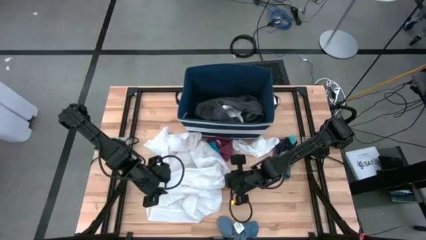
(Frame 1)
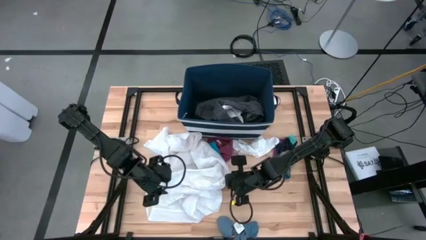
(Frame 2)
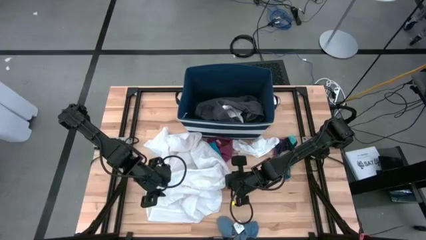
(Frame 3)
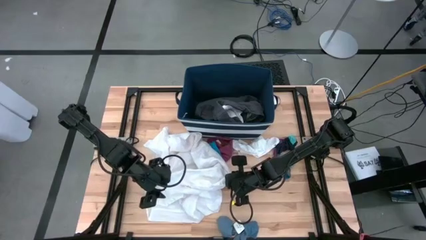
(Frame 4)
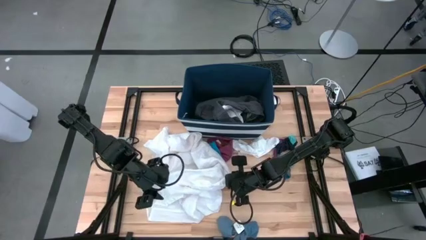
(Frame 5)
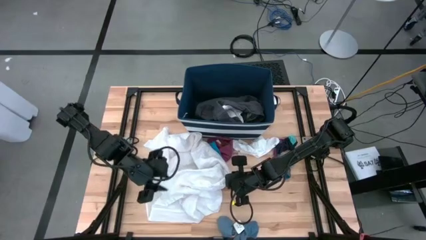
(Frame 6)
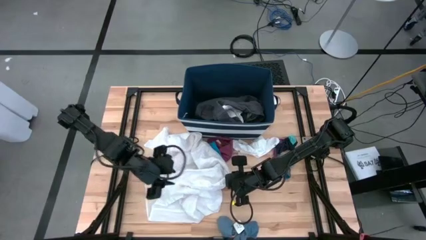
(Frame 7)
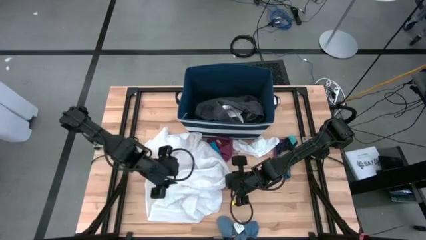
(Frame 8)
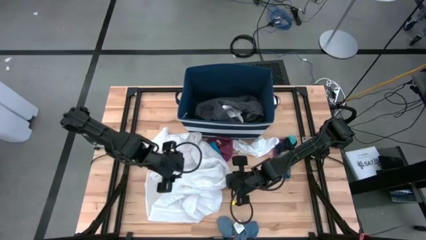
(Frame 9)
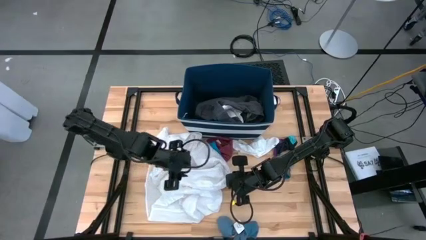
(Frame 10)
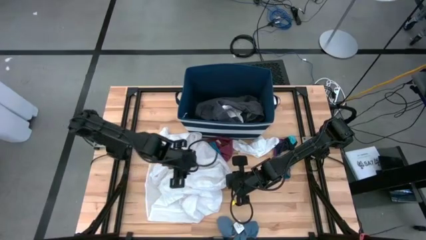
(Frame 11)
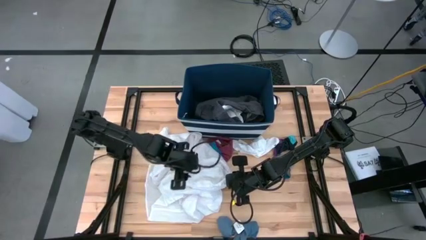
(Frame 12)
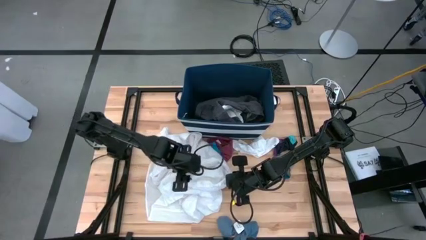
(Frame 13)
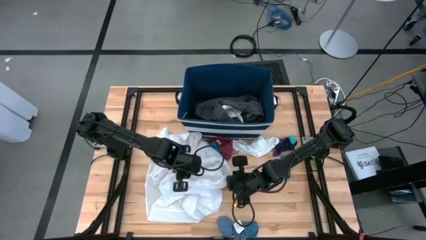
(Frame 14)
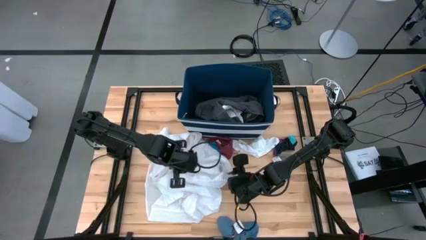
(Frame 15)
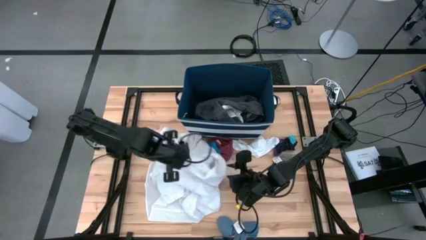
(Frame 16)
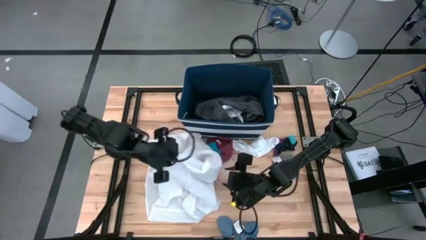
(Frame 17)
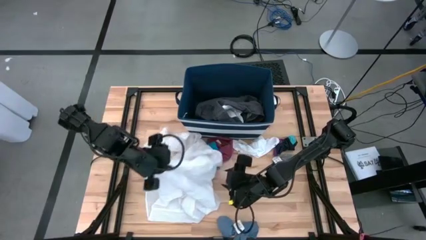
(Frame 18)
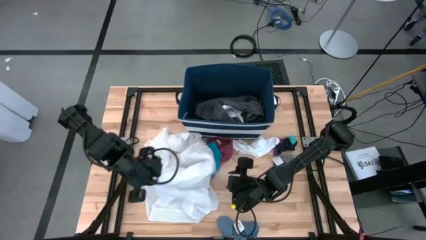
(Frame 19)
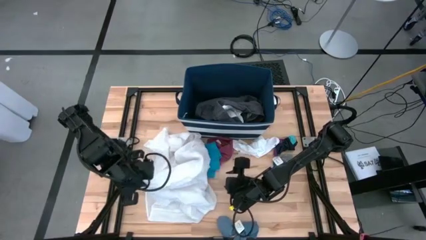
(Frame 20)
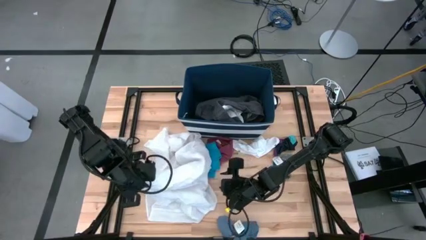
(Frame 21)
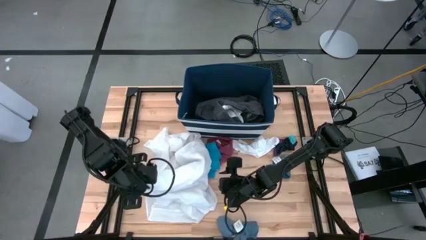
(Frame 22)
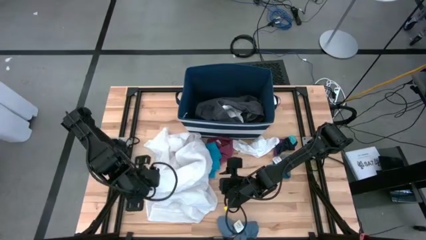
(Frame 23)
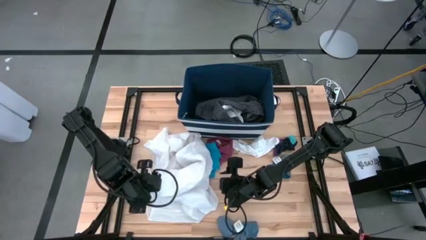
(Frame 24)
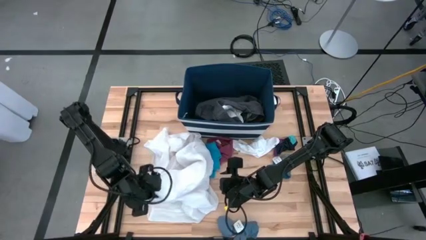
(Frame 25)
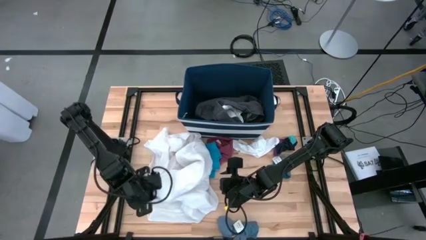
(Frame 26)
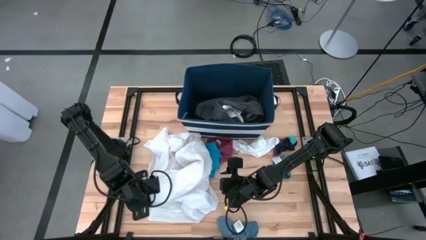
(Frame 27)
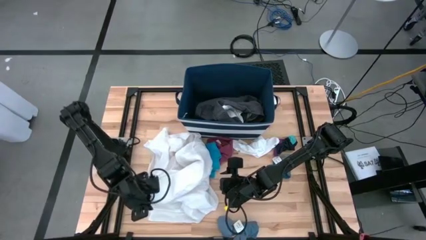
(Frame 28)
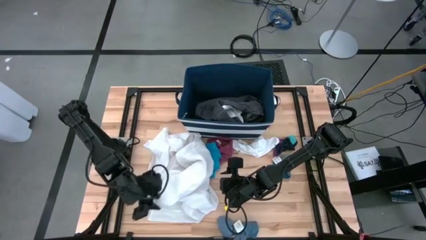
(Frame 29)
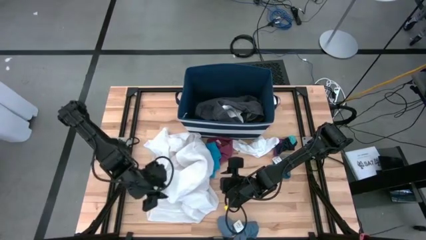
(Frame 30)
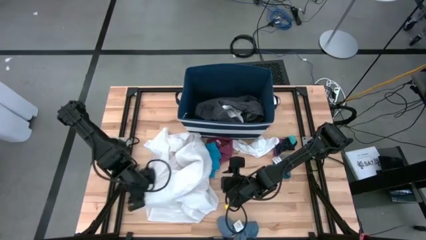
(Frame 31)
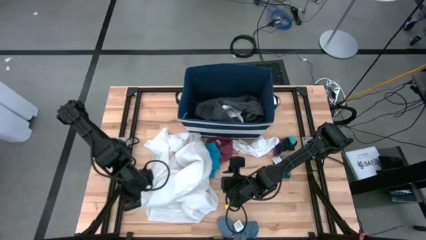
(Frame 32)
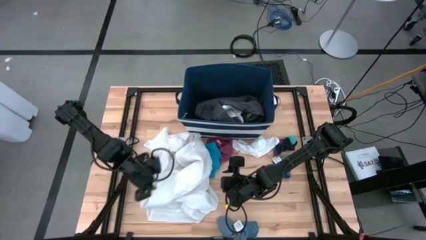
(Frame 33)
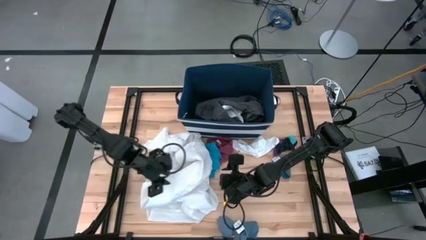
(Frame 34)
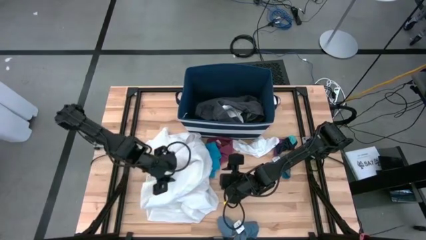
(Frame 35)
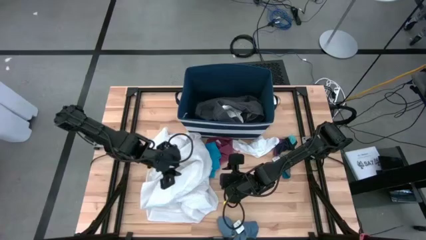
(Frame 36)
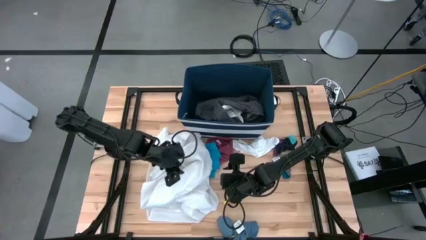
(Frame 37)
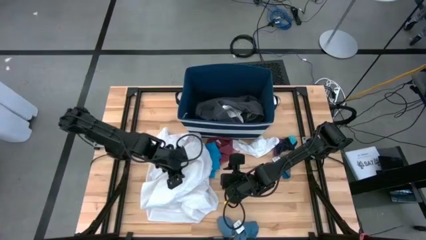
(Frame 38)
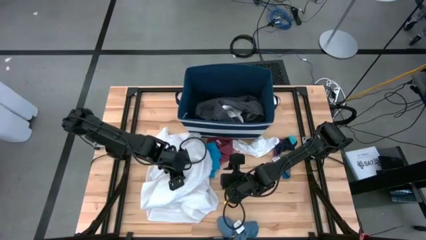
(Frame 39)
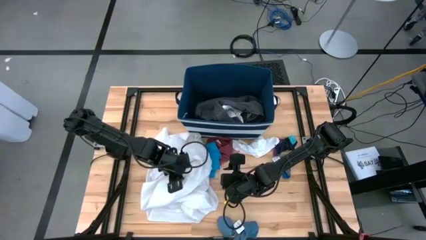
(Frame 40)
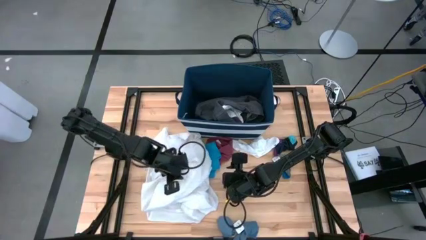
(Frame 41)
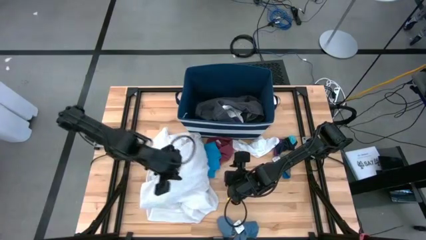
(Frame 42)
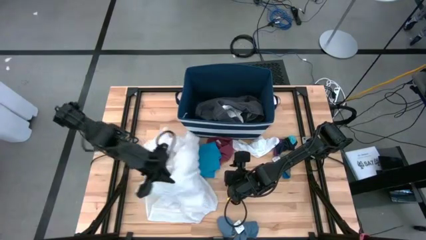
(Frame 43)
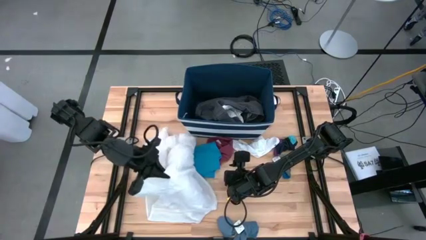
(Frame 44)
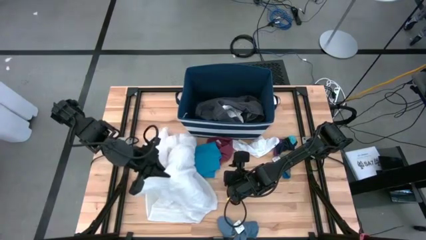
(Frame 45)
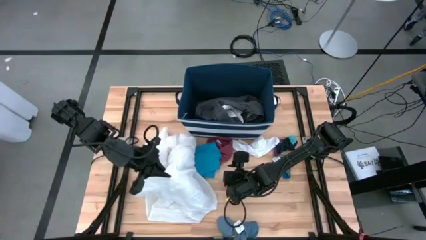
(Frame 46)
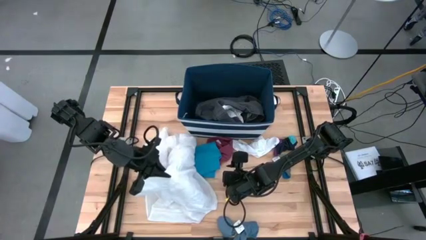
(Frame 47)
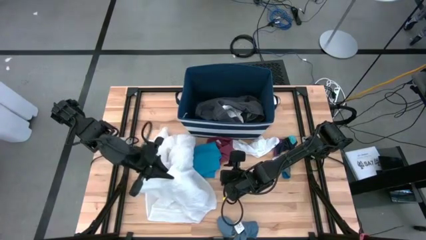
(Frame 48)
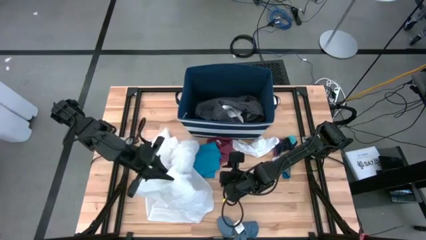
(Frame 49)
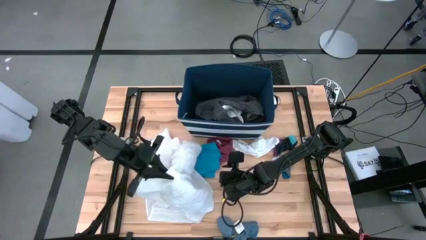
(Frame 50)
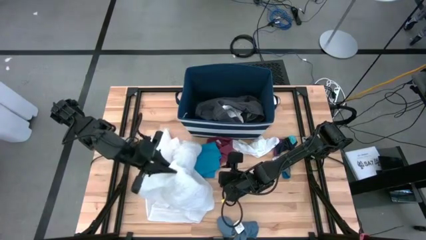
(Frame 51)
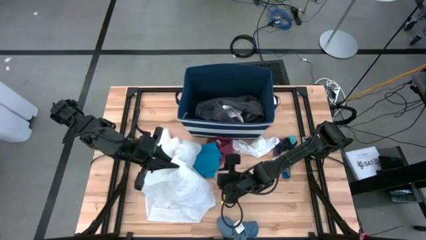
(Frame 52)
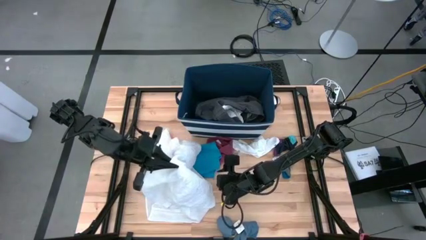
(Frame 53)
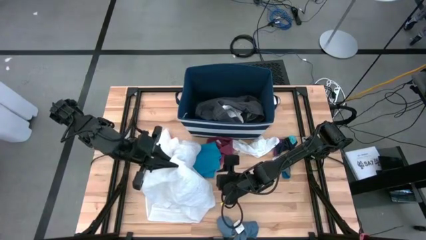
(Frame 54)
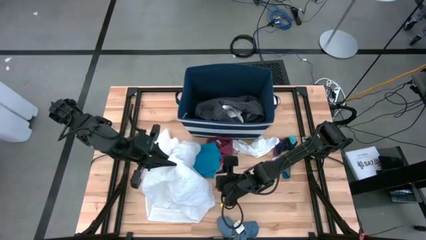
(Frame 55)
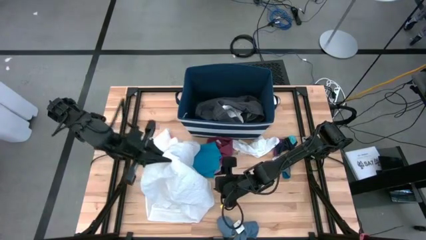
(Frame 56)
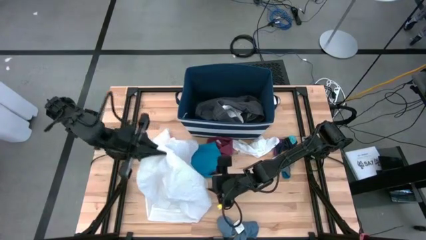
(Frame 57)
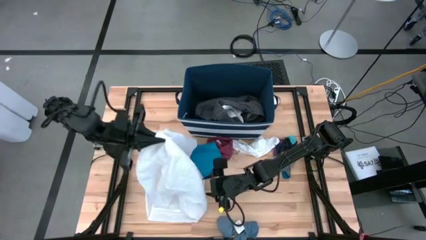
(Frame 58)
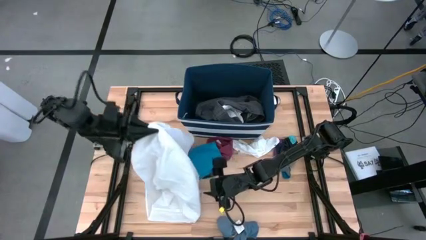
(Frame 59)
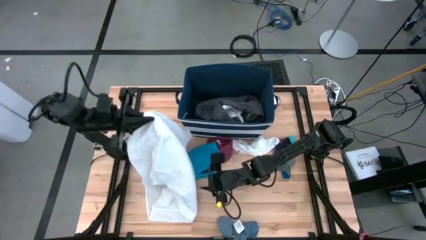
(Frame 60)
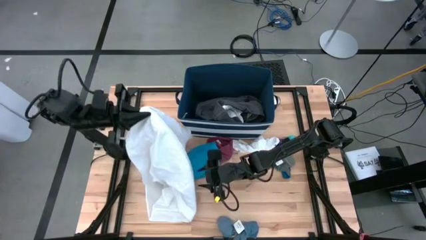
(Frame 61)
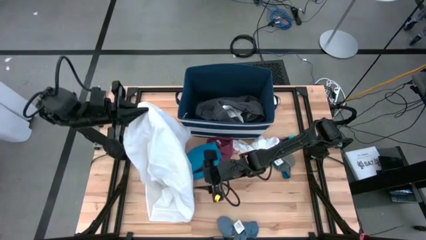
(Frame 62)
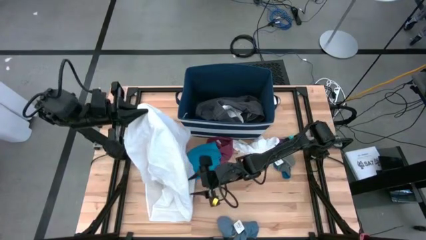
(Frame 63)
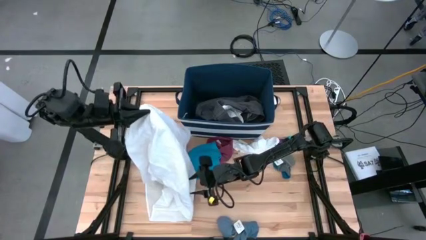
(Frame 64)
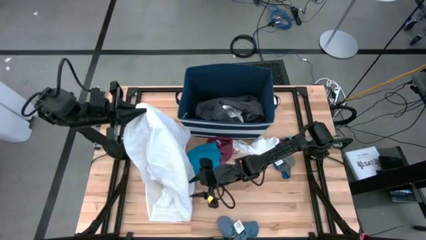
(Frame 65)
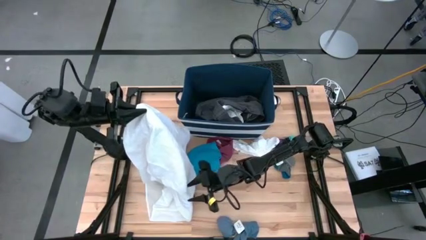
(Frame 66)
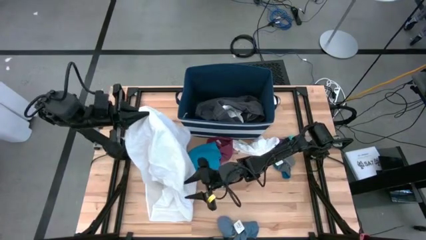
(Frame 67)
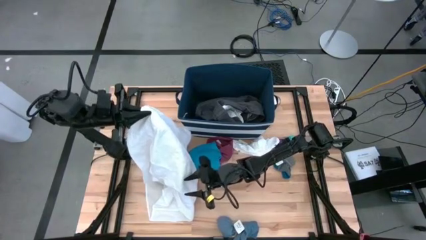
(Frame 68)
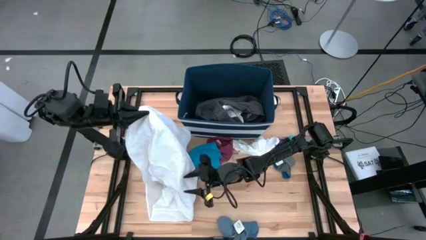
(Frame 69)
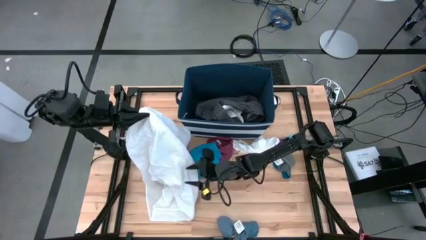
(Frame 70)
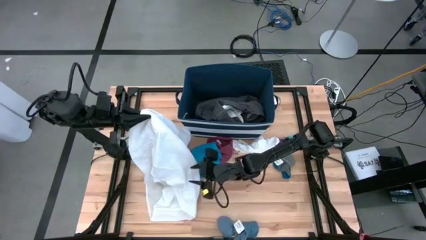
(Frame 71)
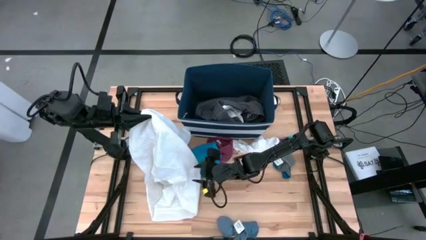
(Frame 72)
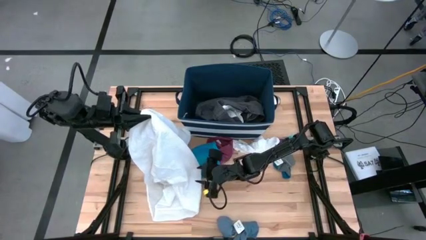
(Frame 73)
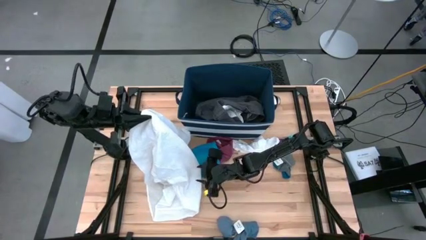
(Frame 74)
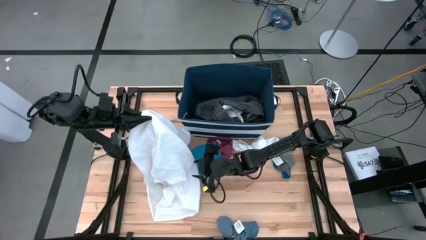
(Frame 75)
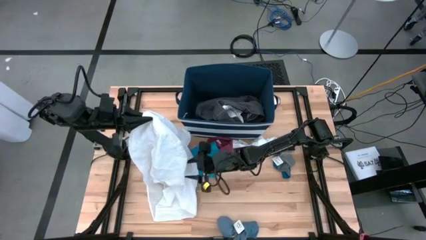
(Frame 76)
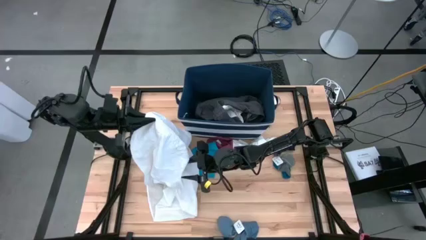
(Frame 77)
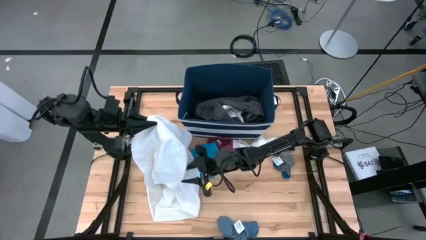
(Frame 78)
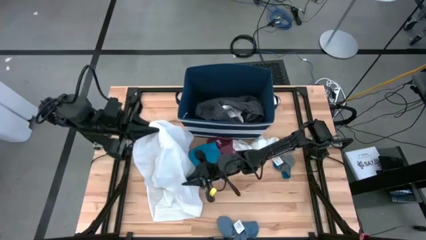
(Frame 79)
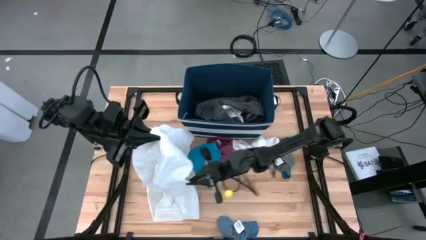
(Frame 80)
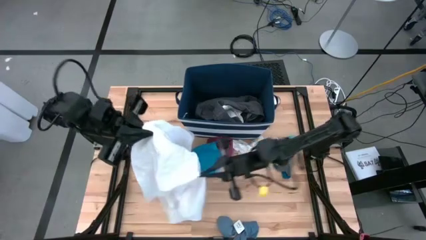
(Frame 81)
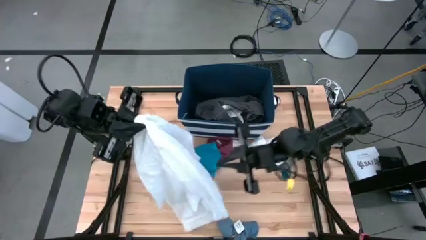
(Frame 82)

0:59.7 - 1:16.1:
Task: Sort clothes
Put the white shirt into the blue laundry organizer
